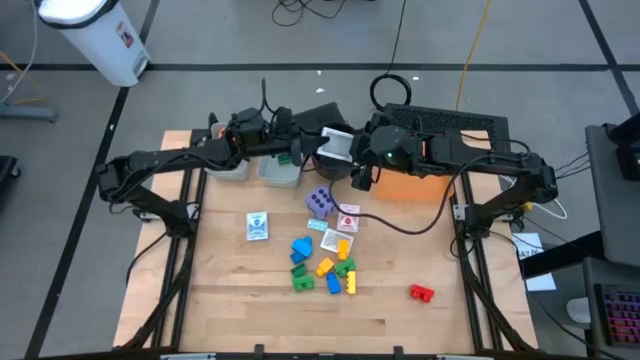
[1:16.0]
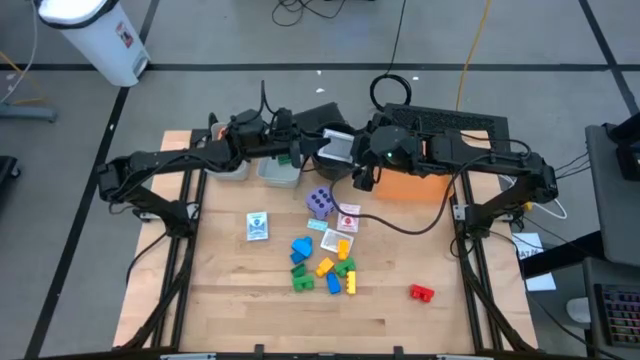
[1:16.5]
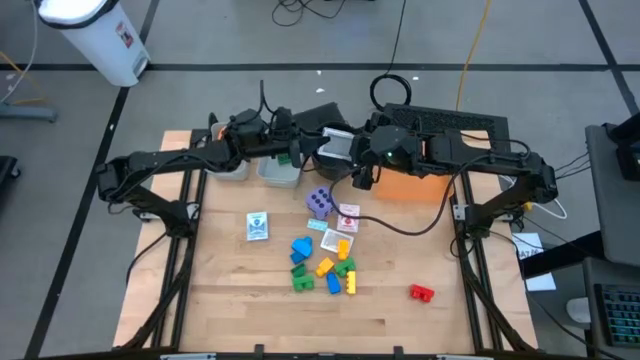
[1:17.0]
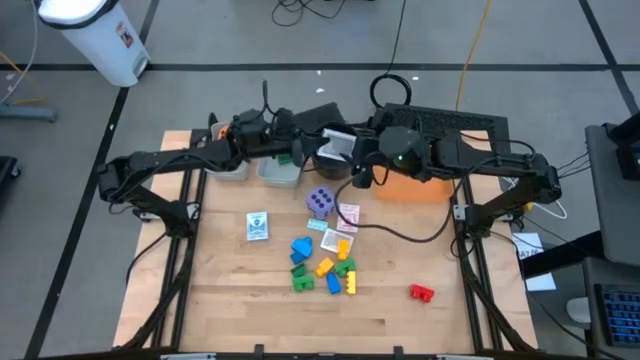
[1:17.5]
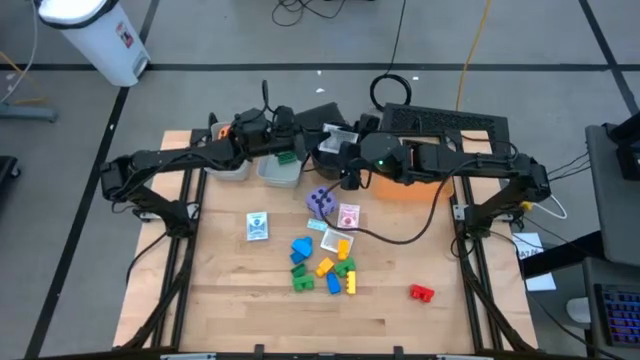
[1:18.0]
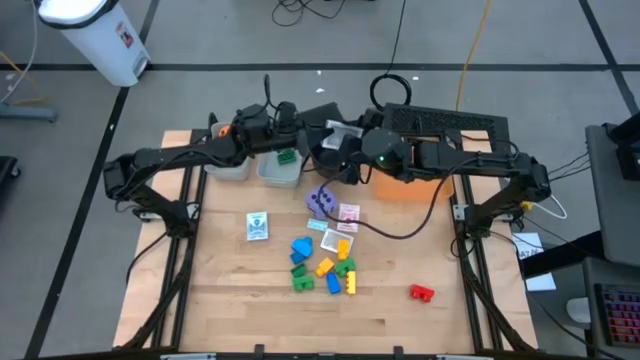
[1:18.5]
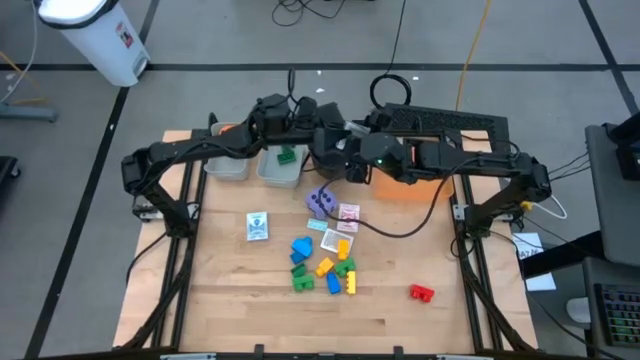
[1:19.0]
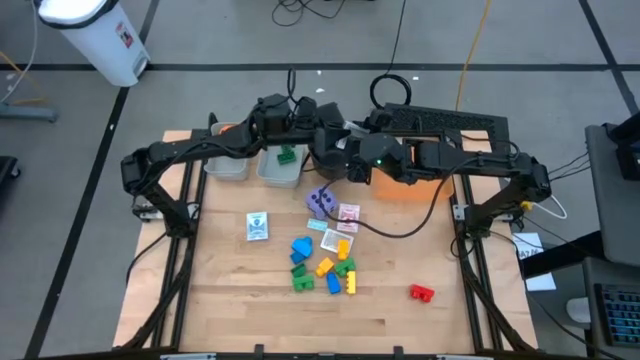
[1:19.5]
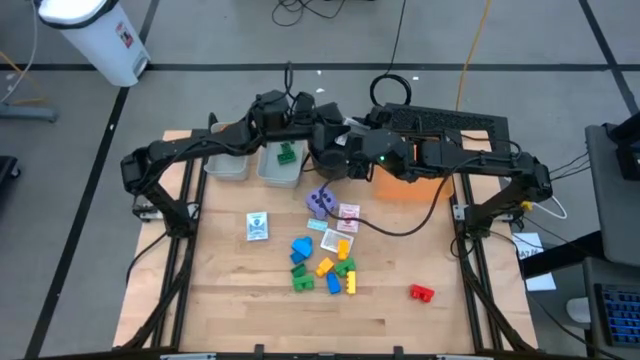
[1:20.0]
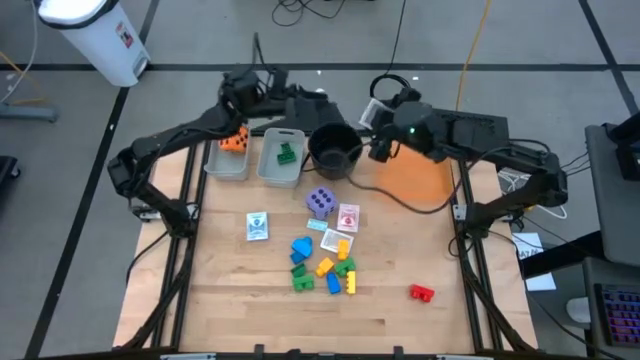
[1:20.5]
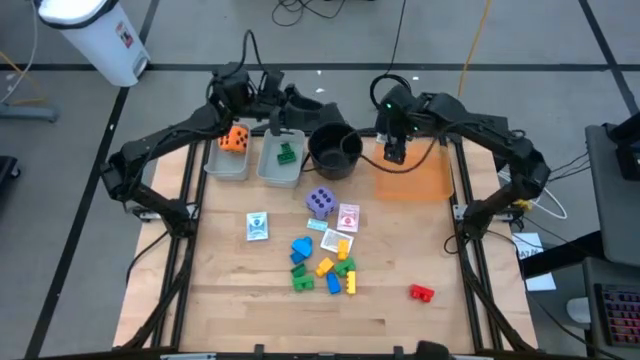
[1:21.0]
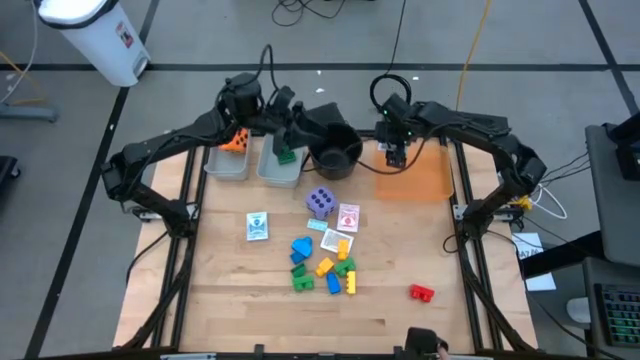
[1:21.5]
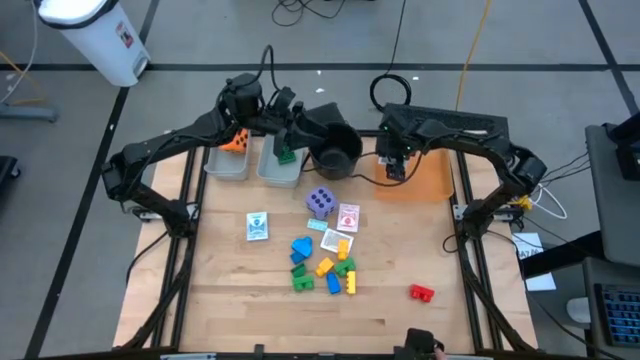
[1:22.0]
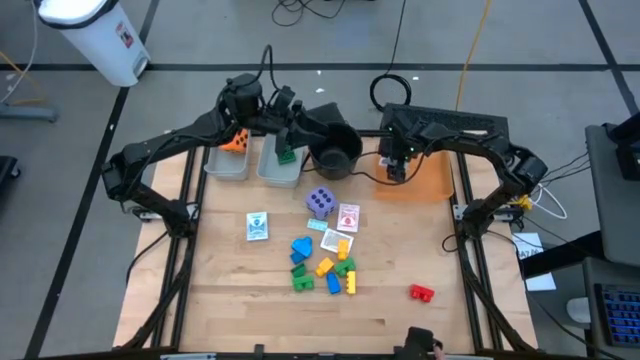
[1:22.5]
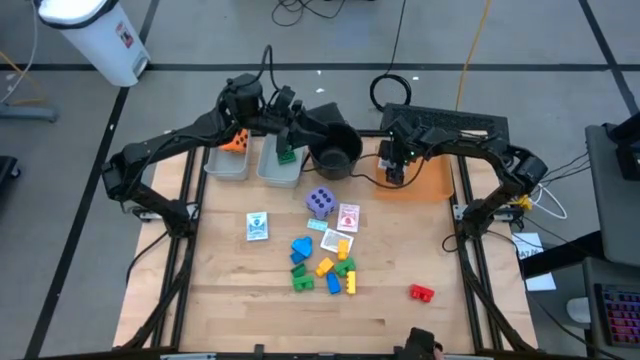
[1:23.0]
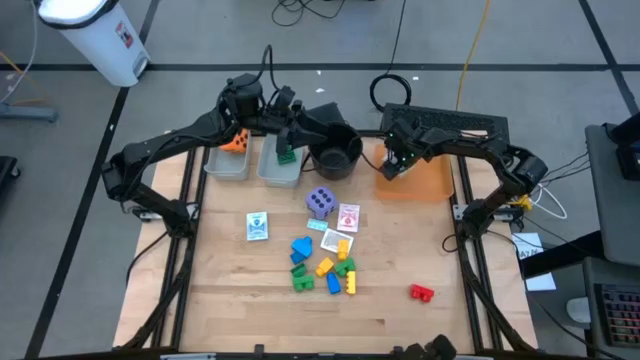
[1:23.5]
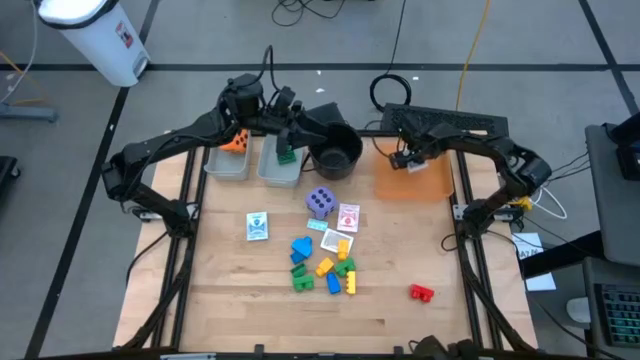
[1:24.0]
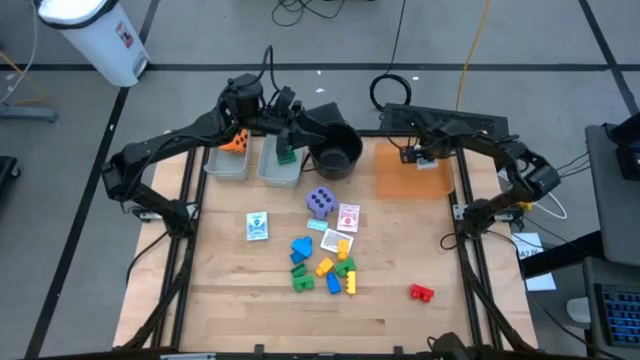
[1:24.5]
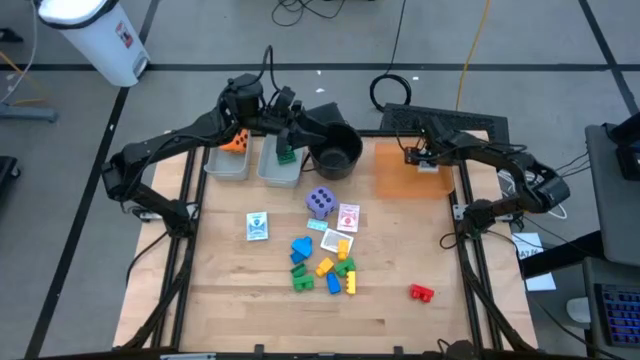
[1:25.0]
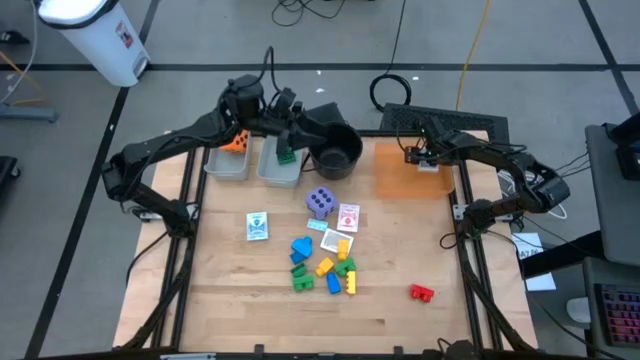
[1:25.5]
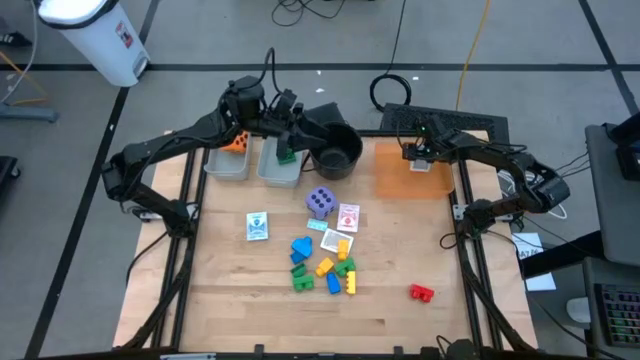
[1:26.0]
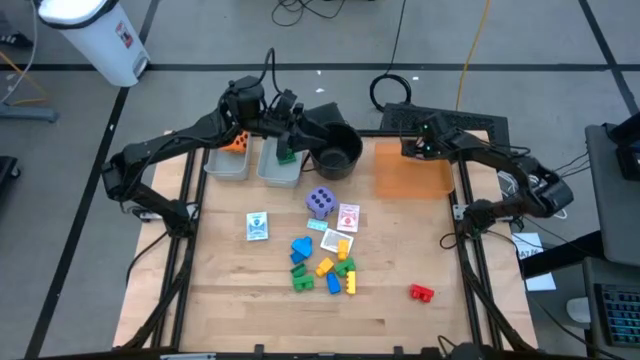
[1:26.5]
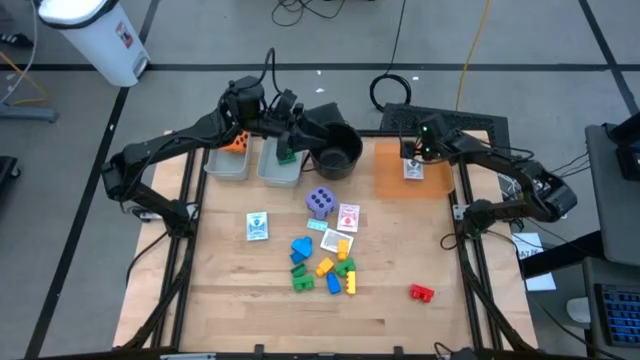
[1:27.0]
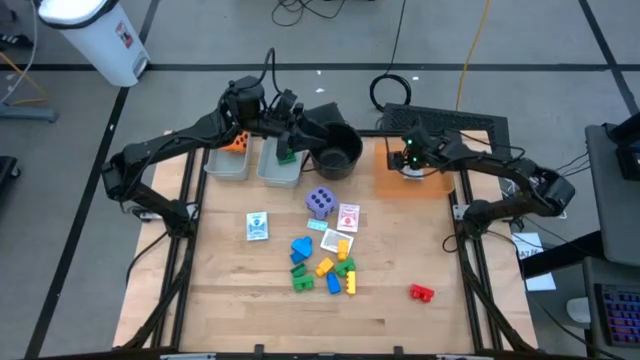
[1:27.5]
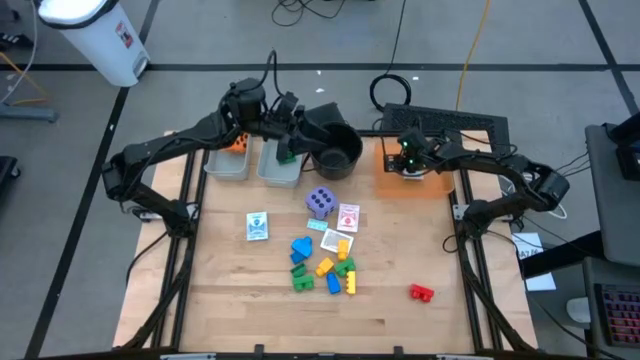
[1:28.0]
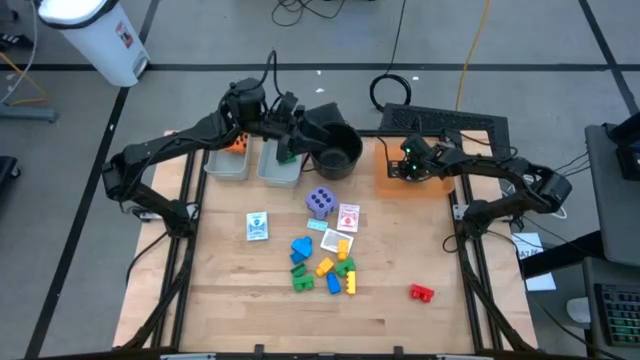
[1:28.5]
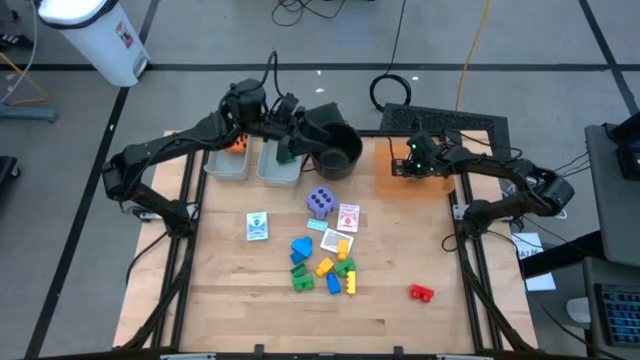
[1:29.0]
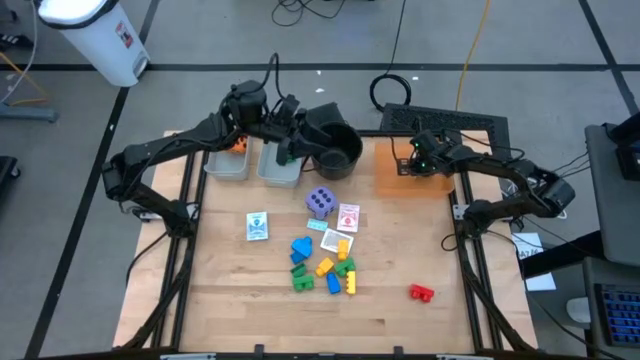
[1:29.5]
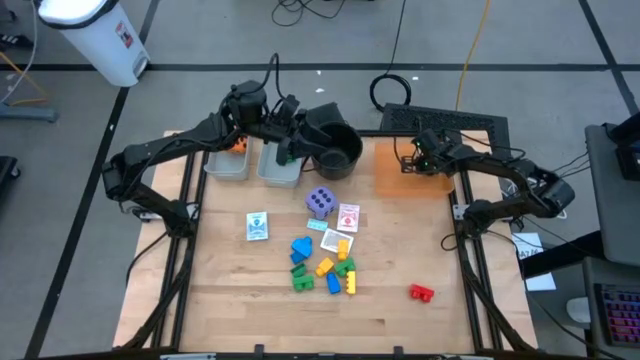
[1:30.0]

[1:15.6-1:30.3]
Task: Pick & Place Toys
Put the black deck of cards into the orange bin

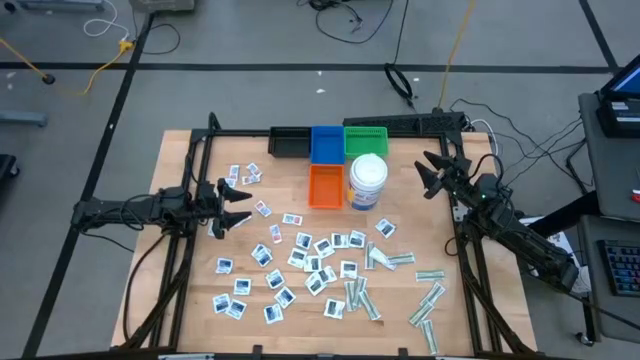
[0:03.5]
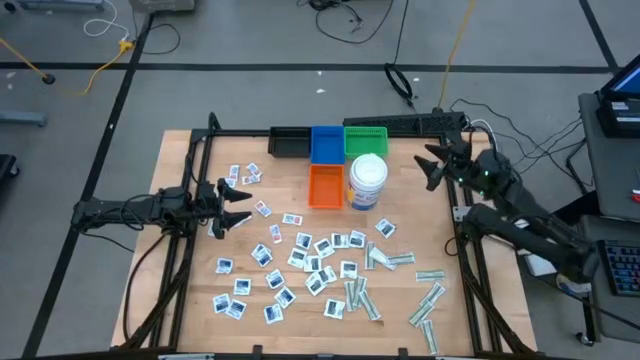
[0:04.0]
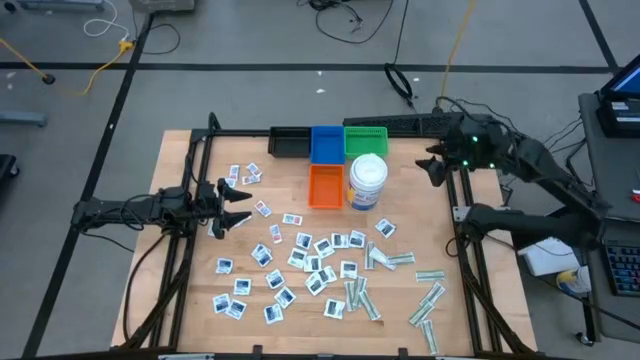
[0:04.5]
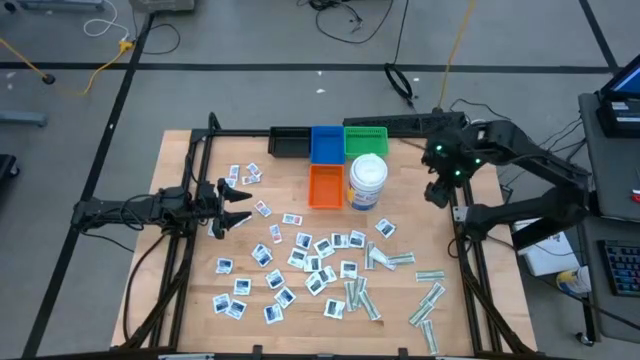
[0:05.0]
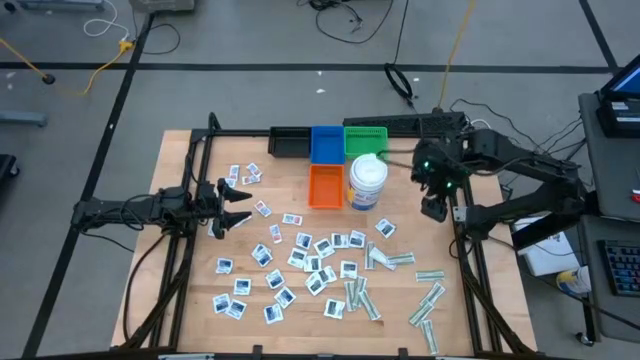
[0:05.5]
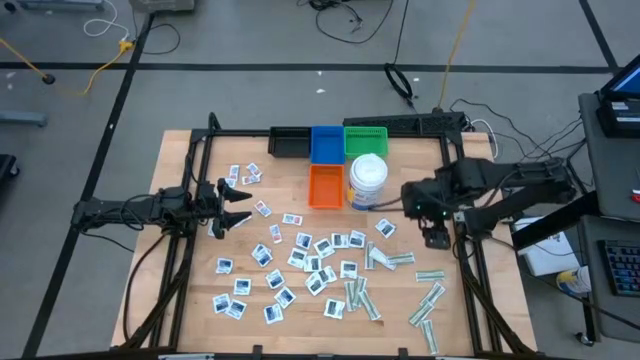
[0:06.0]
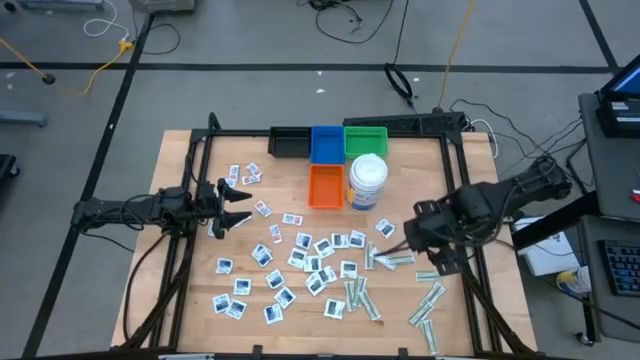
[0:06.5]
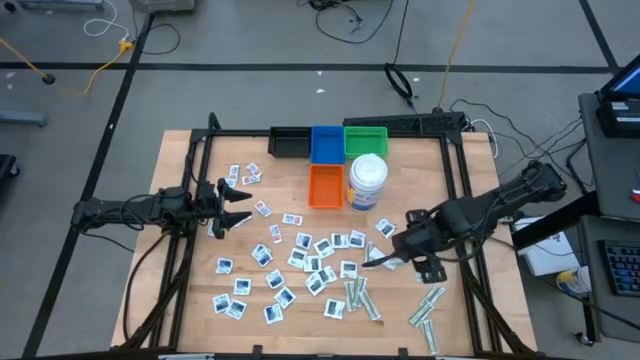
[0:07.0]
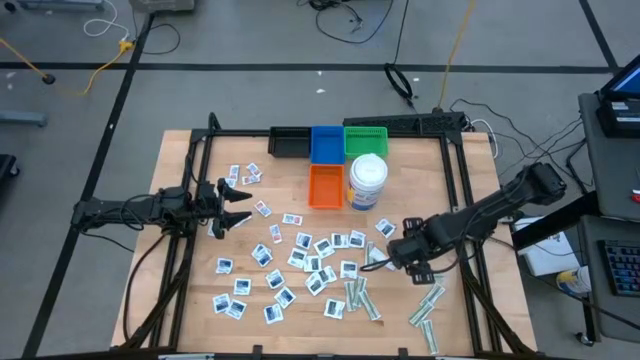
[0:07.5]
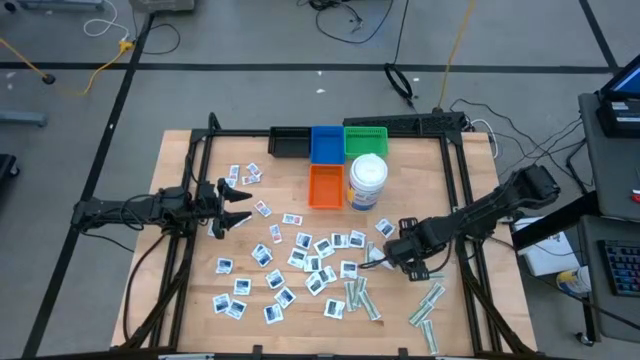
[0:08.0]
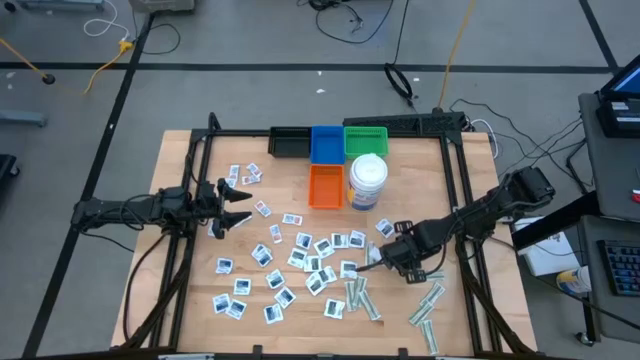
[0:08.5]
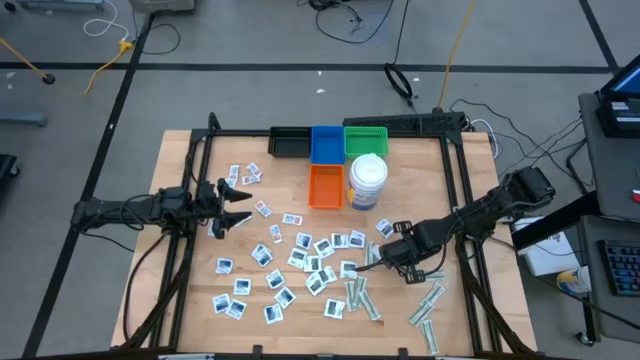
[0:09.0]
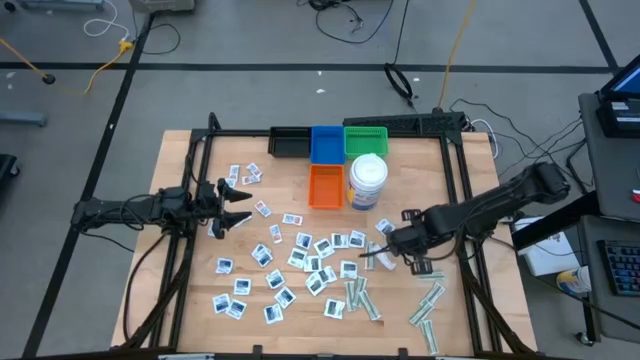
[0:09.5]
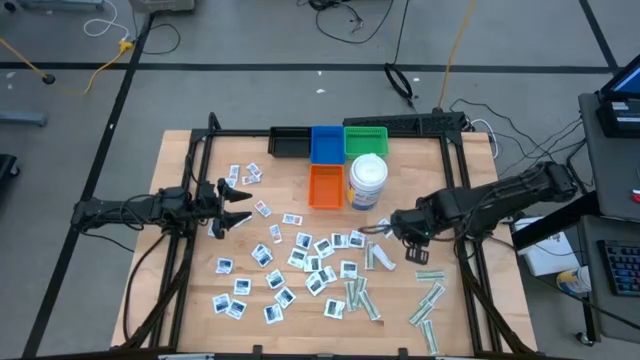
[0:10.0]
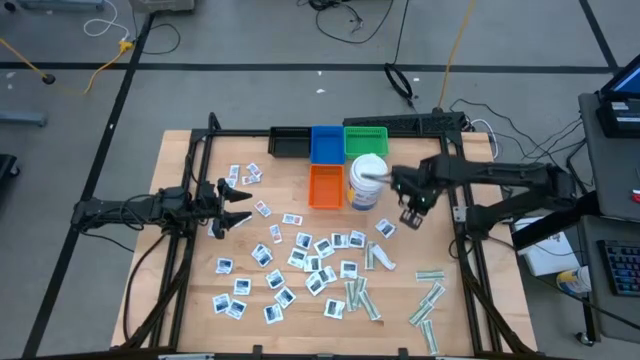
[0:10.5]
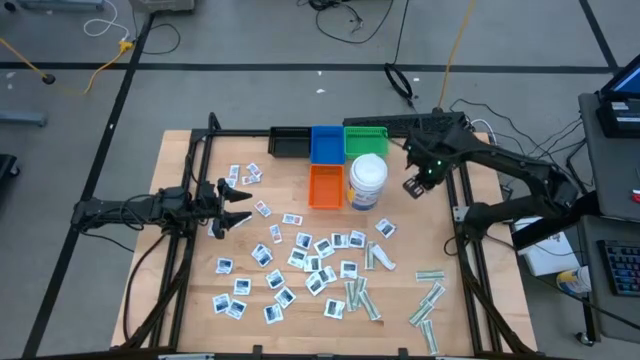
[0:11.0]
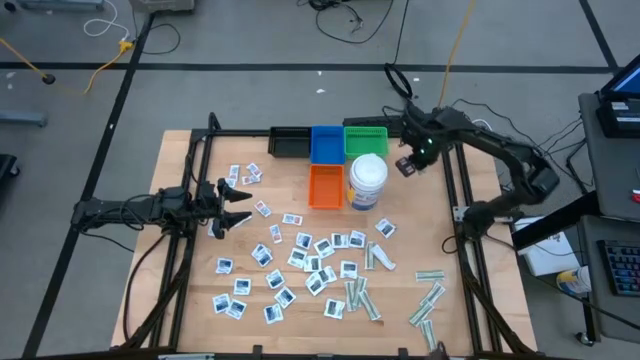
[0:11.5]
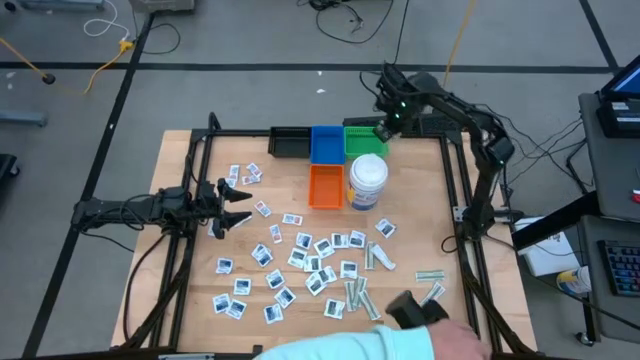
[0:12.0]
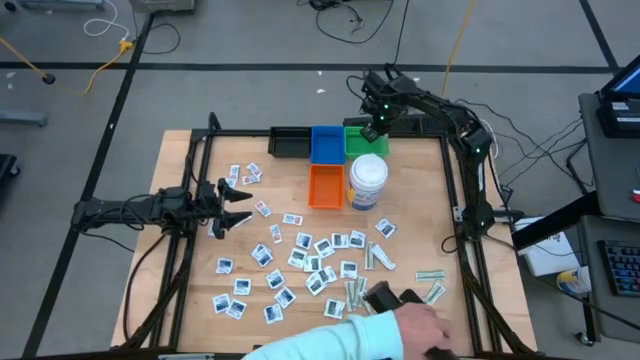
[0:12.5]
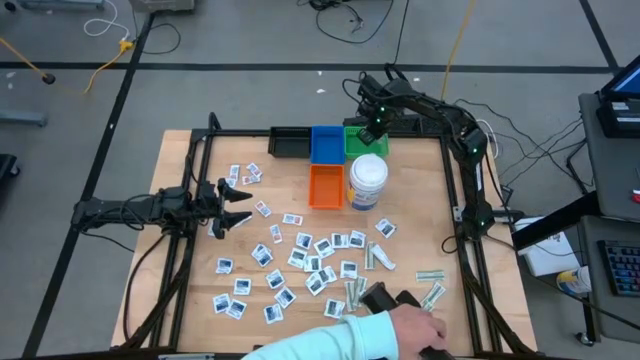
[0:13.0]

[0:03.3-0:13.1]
Task: Pick & Place First Aid Supplies
Put the green bandage pack into the green bin
